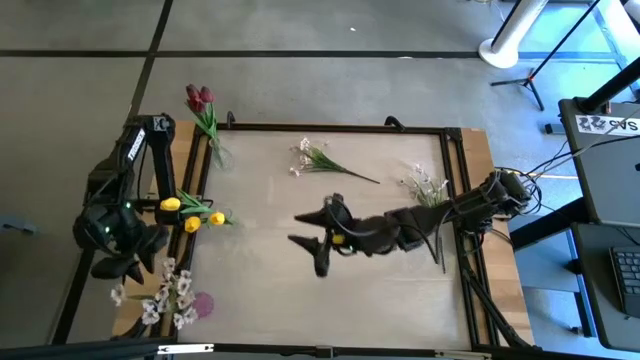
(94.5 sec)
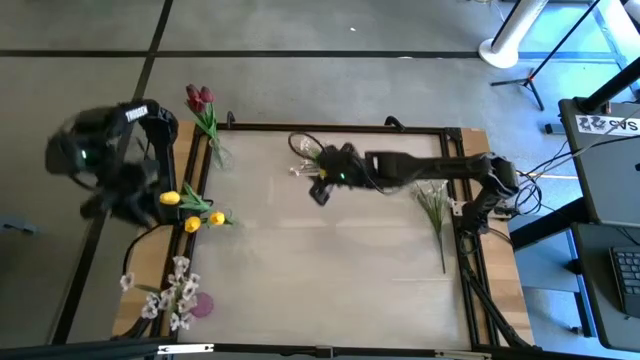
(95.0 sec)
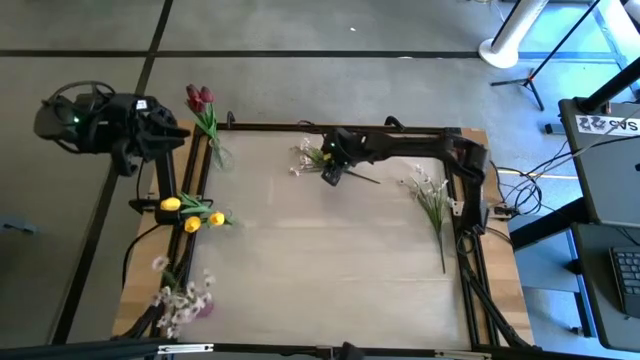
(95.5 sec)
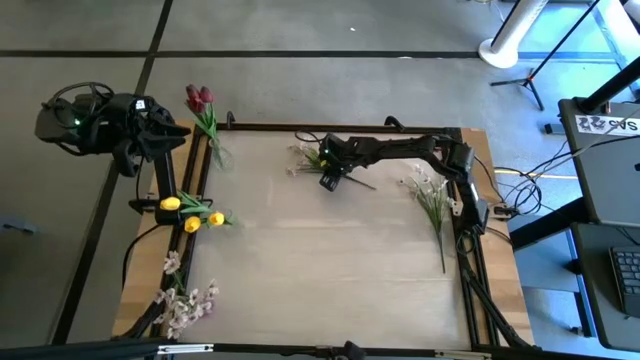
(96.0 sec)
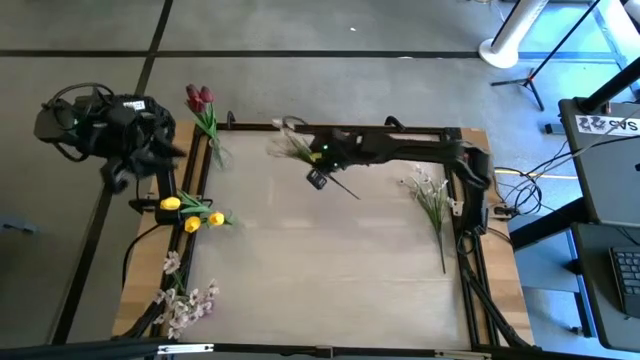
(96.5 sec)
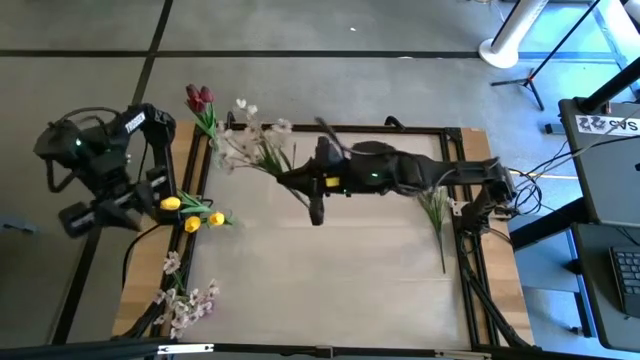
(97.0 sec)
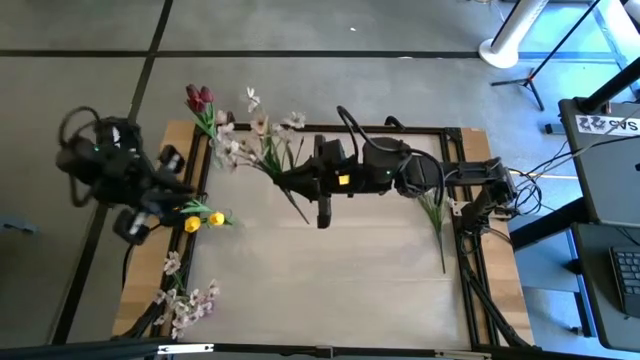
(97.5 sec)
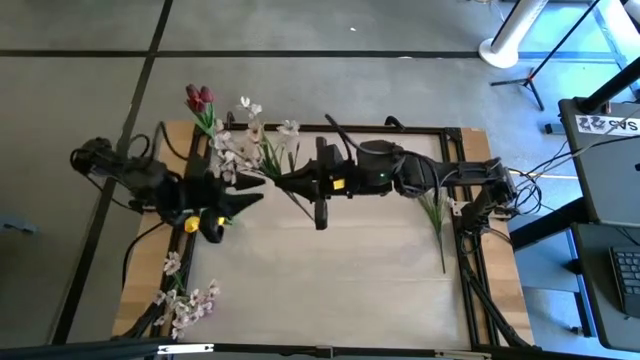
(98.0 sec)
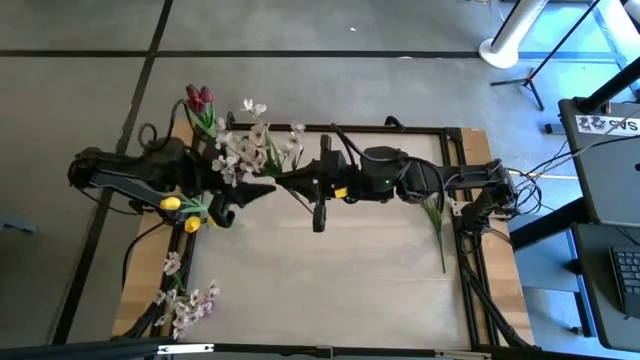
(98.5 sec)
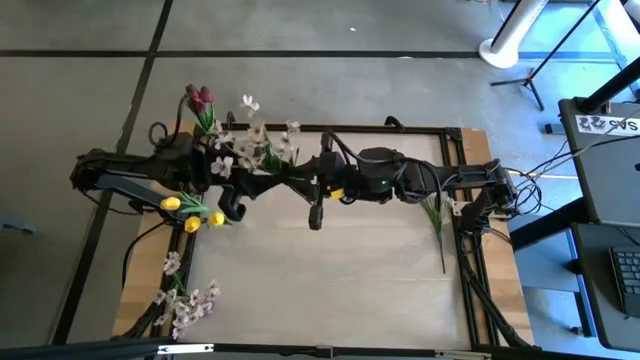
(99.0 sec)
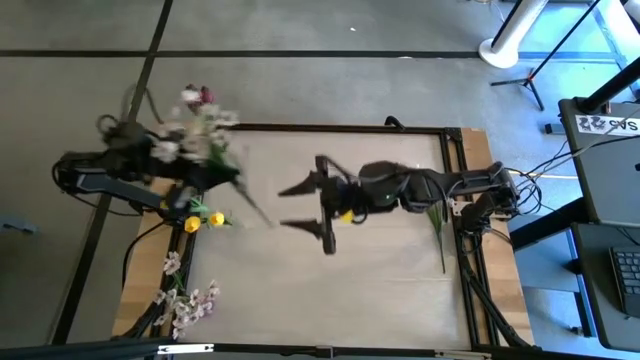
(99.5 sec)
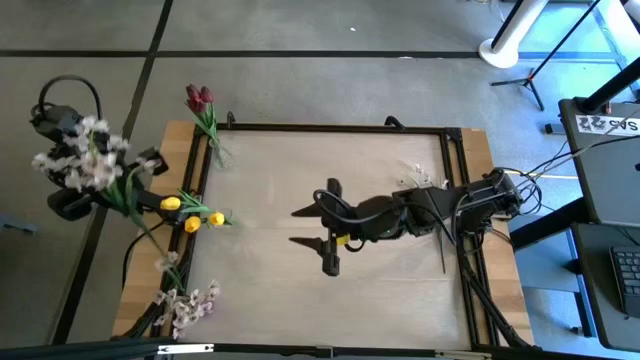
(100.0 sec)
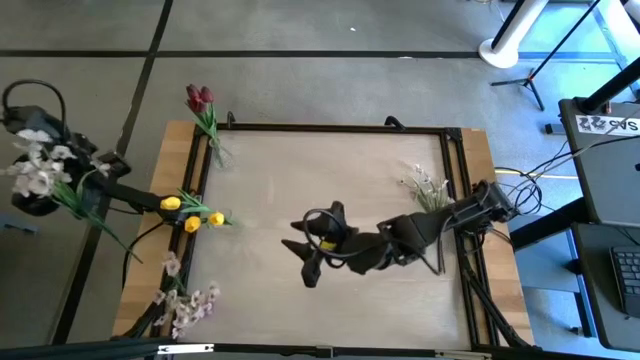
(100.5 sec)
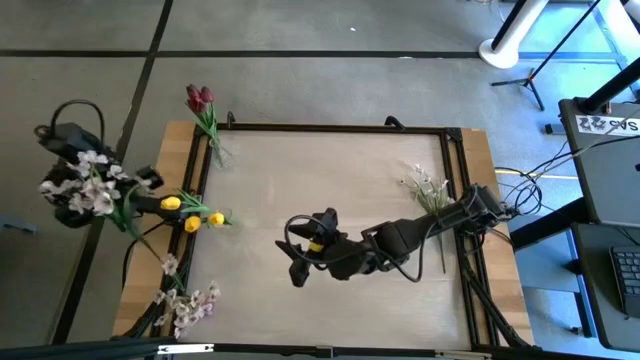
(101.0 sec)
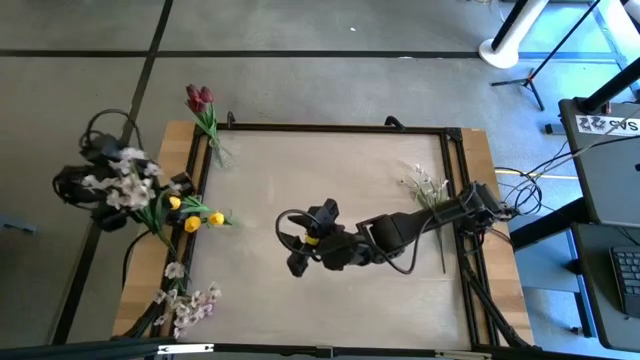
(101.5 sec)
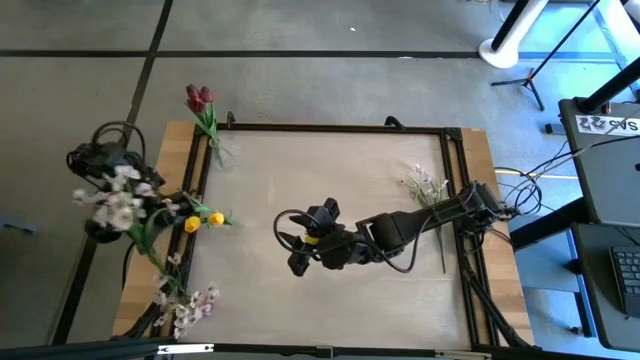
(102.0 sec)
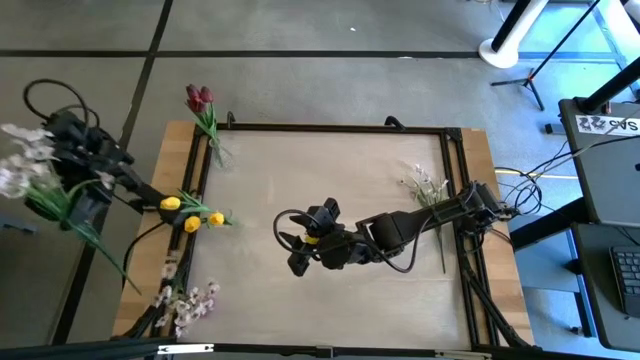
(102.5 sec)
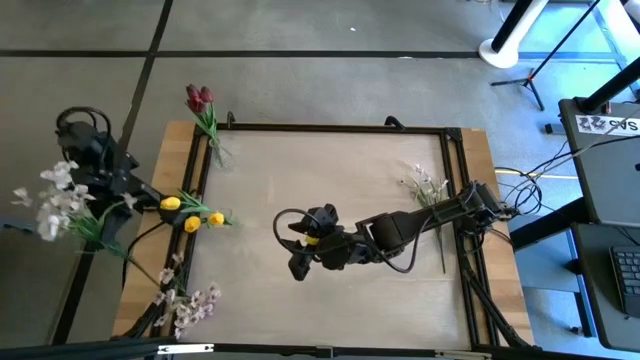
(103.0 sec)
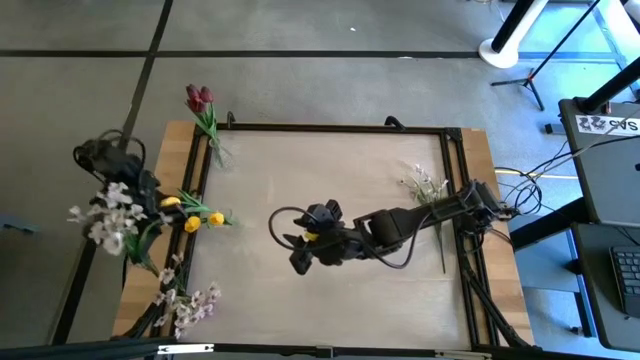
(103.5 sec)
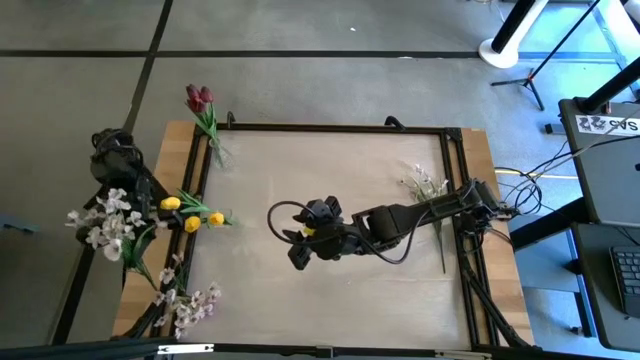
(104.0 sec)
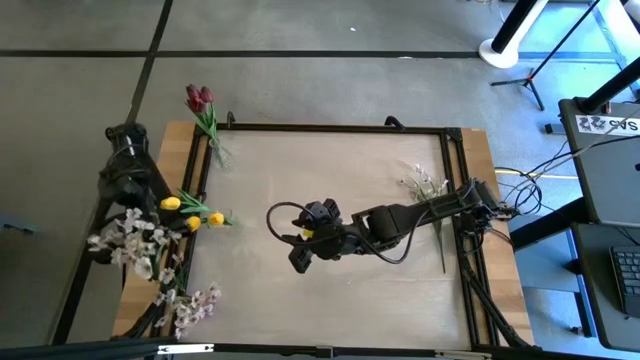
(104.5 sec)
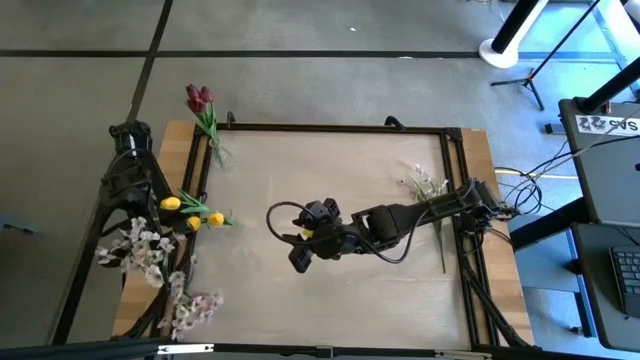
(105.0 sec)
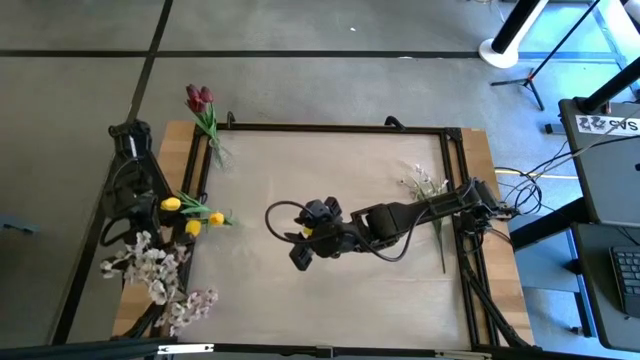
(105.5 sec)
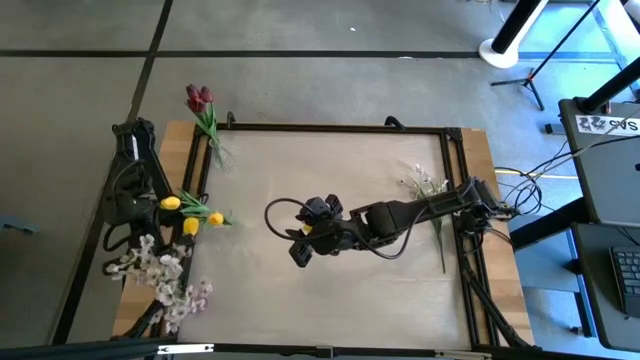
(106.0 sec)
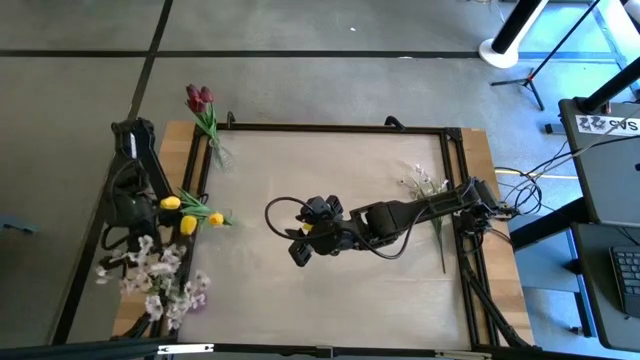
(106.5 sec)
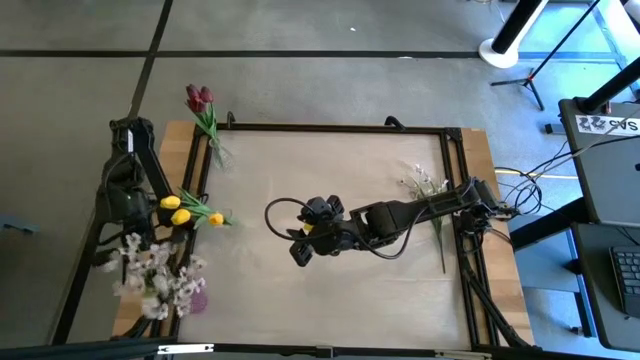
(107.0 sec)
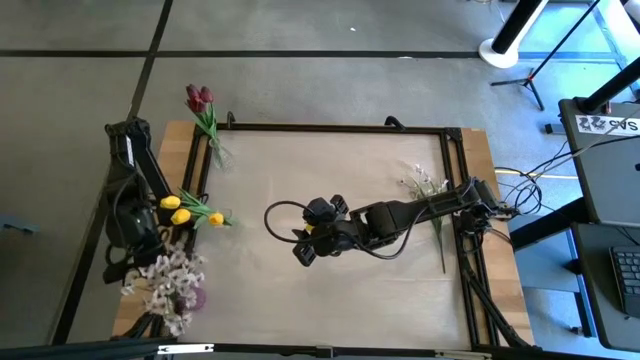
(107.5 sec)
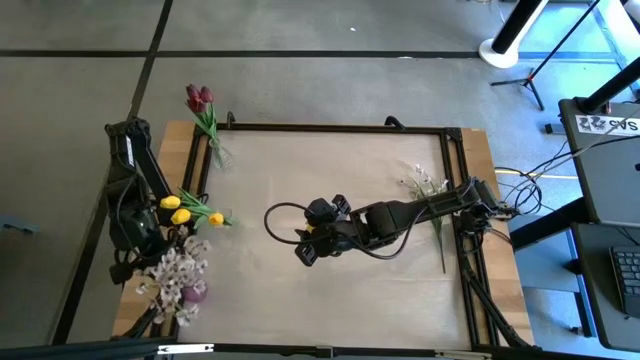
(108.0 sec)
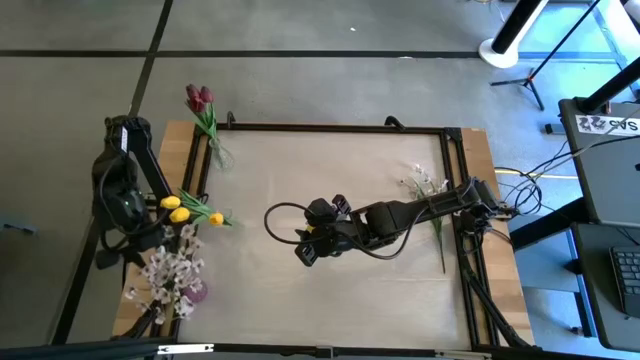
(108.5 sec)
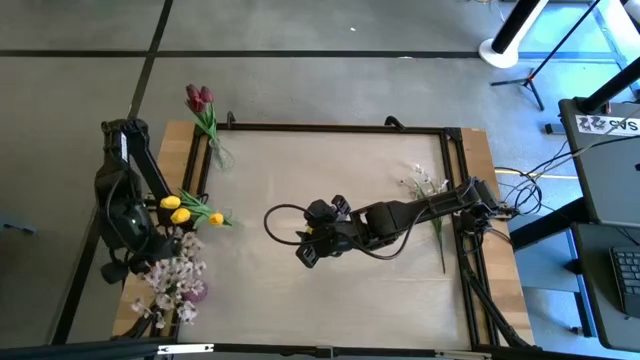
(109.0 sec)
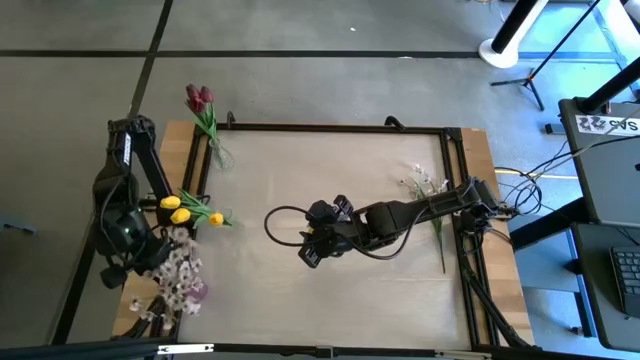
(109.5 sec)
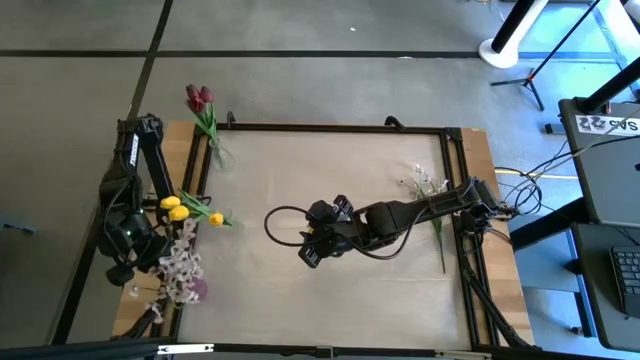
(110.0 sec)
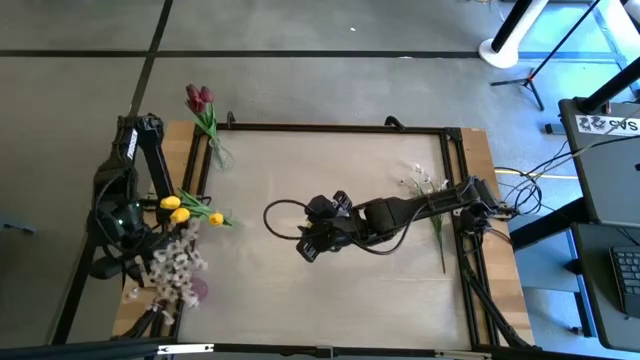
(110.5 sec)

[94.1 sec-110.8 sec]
Task: Sort flowers into vase by color
Put the top white flowers into the purple vase

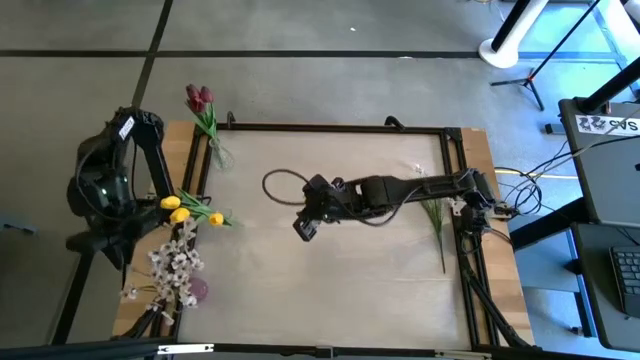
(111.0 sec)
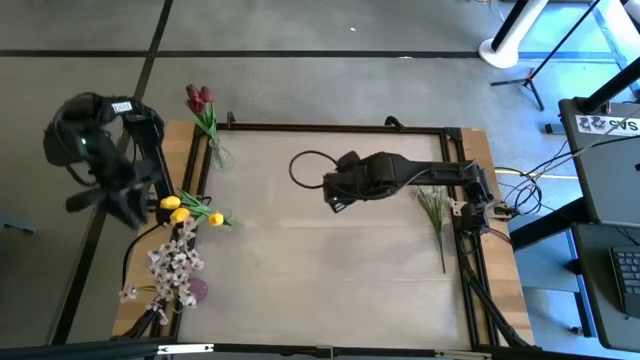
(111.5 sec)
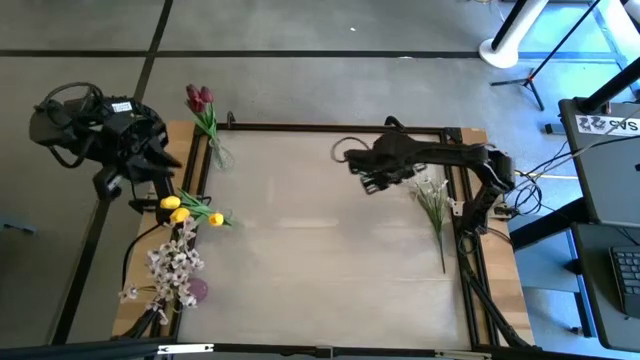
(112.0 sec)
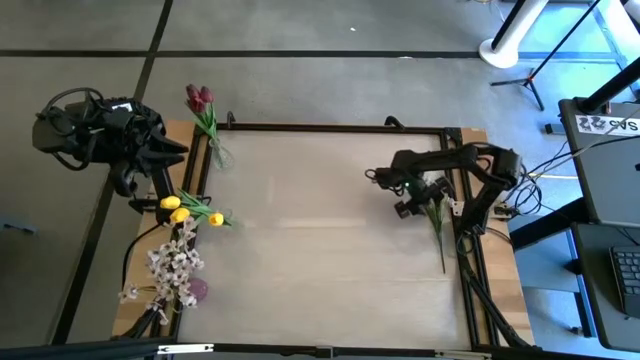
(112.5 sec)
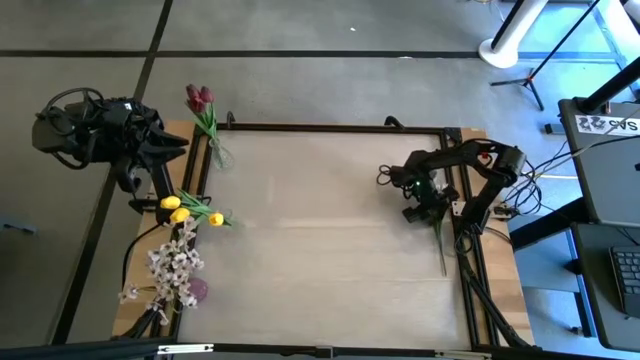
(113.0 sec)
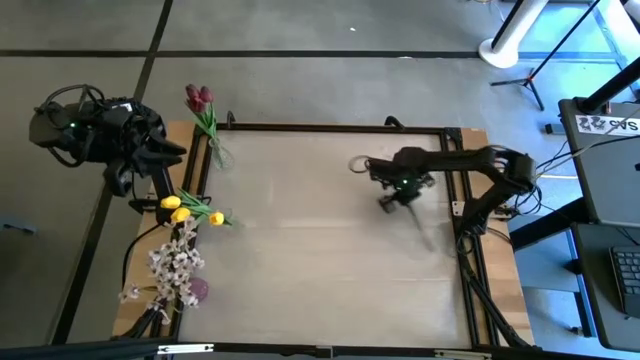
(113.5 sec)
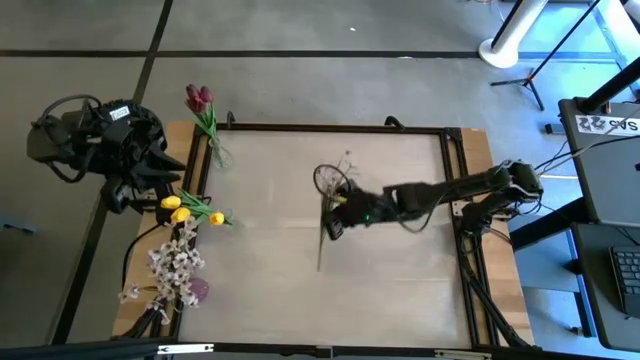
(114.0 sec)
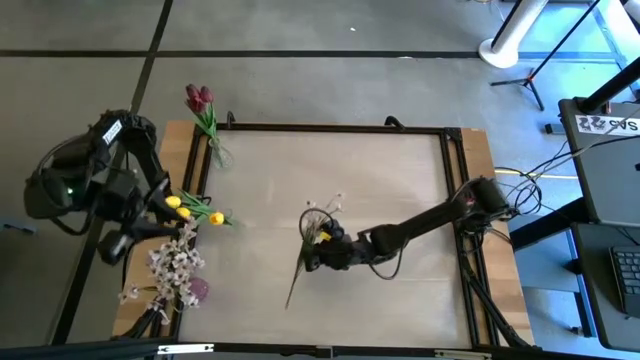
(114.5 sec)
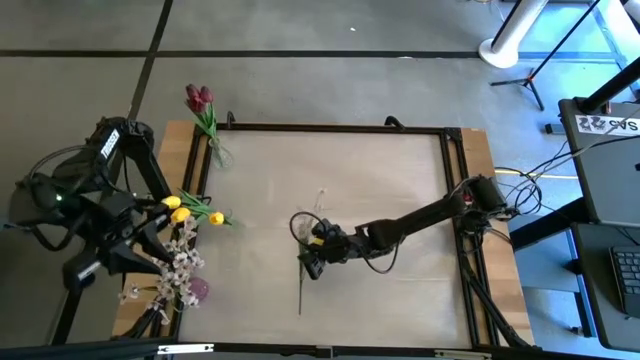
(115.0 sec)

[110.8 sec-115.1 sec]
Move the white flowers to the center to the center of the table
